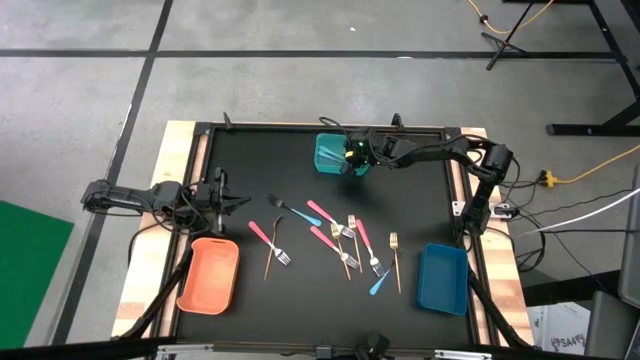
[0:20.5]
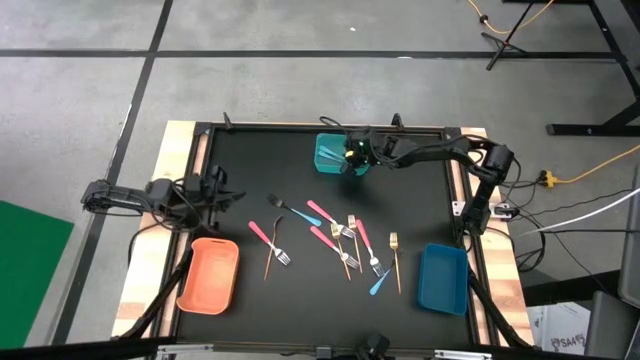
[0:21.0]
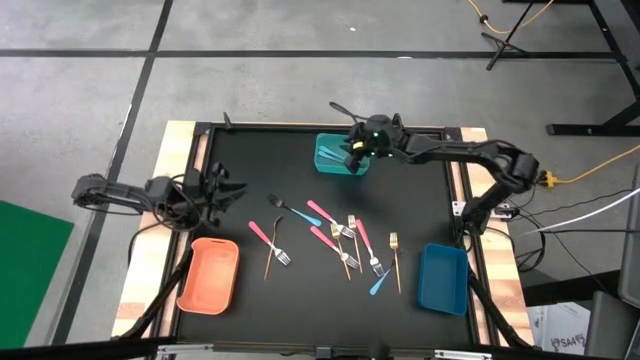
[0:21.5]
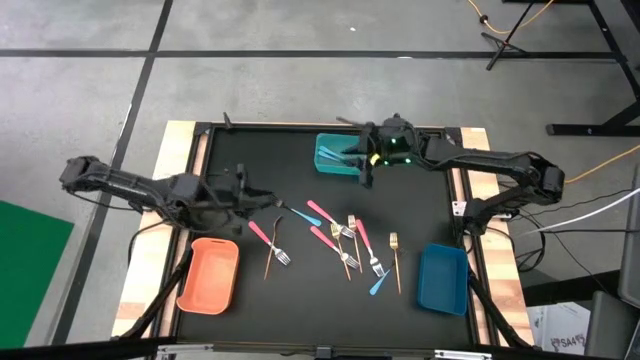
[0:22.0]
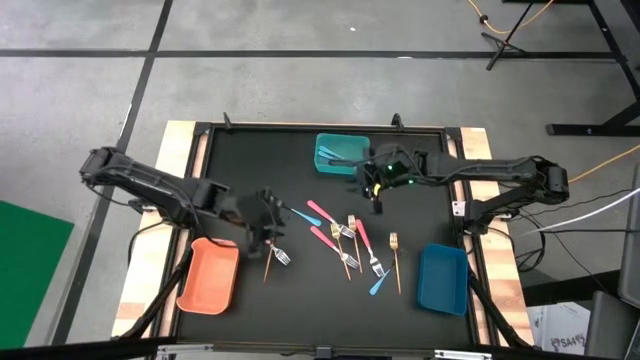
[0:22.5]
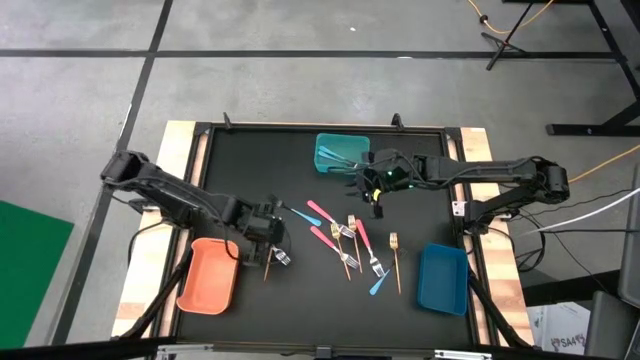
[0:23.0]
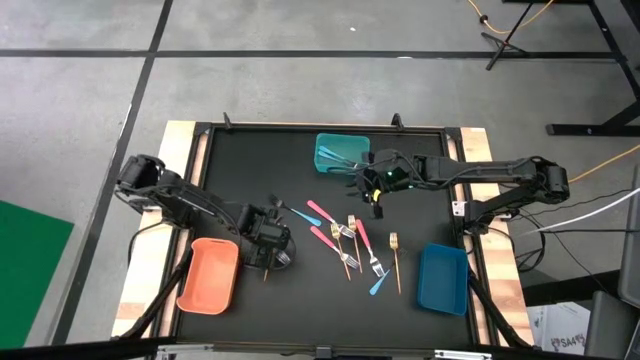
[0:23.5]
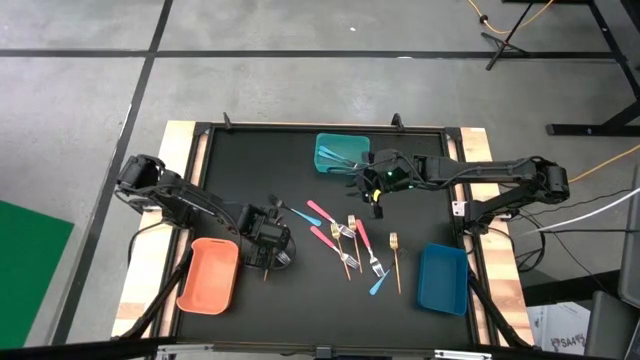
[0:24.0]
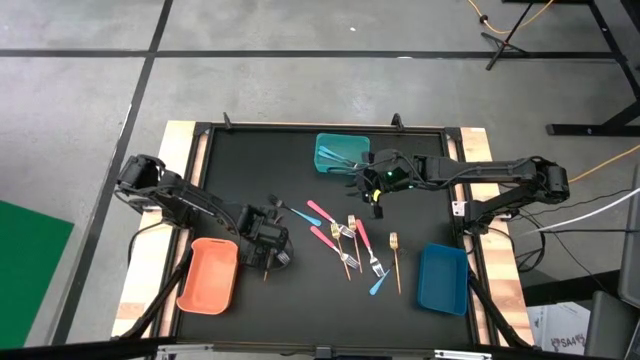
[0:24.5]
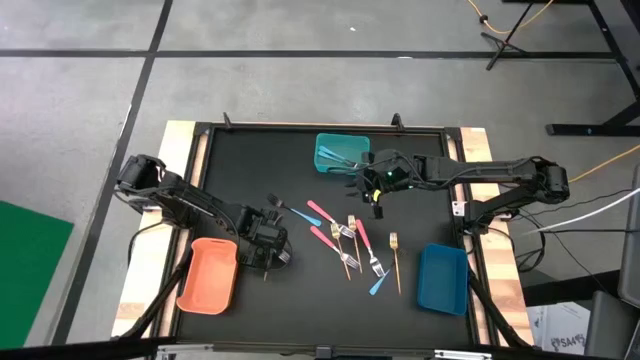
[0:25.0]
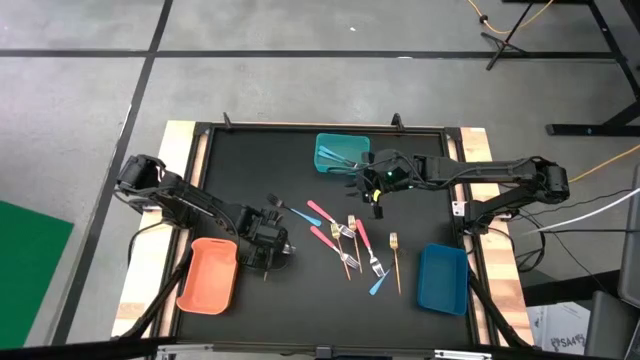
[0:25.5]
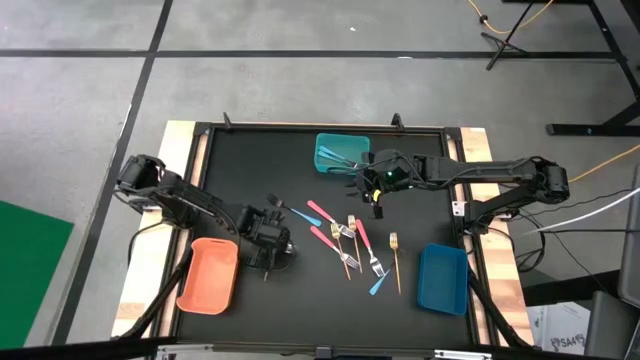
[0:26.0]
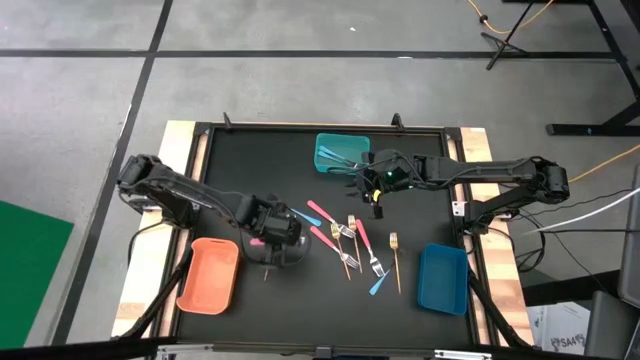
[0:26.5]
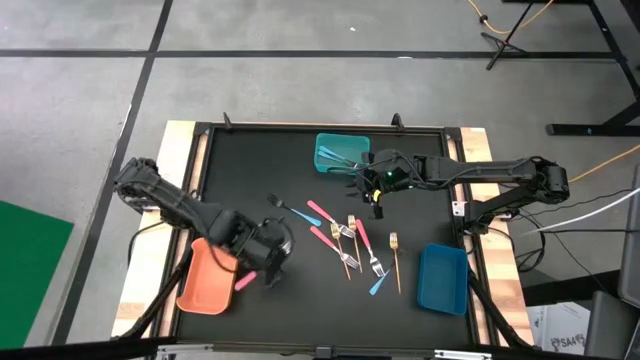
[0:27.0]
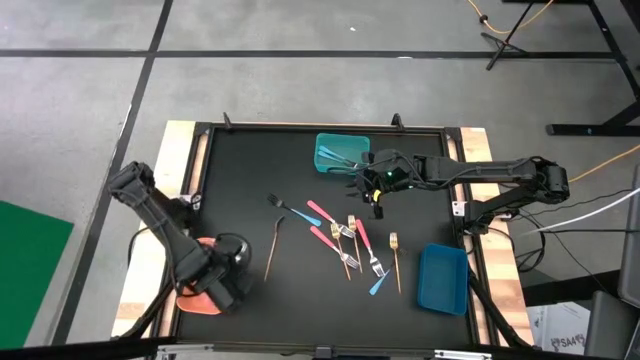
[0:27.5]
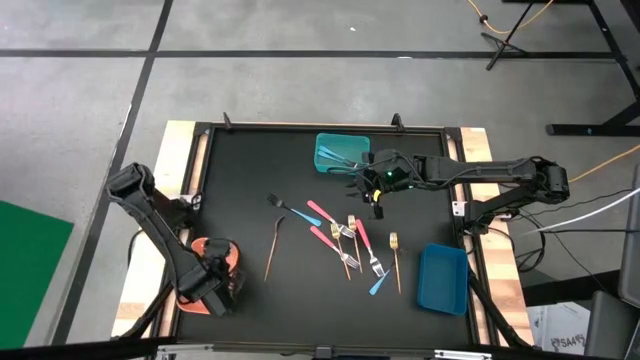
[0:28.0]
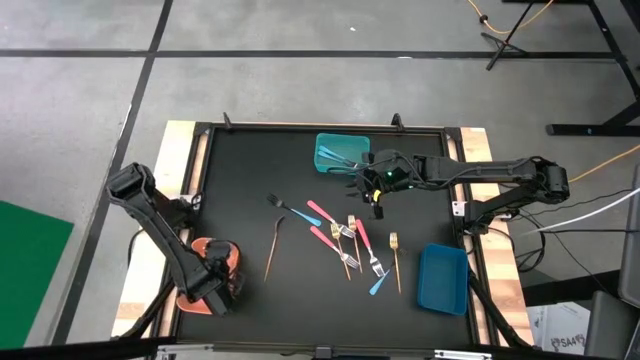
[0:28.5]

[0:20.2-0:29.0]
Task: Sort silverware by color (type)
Put the pink fork into the orange bin

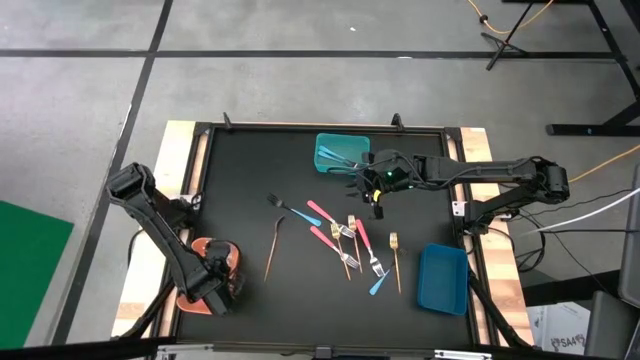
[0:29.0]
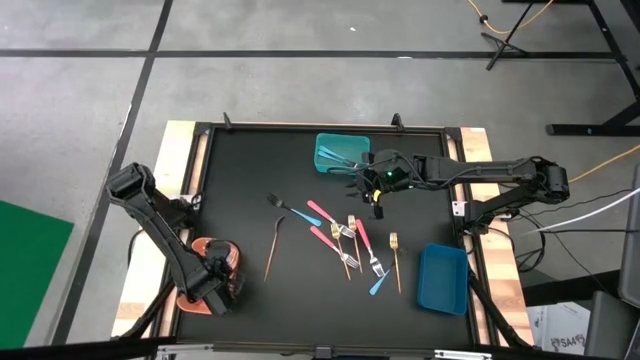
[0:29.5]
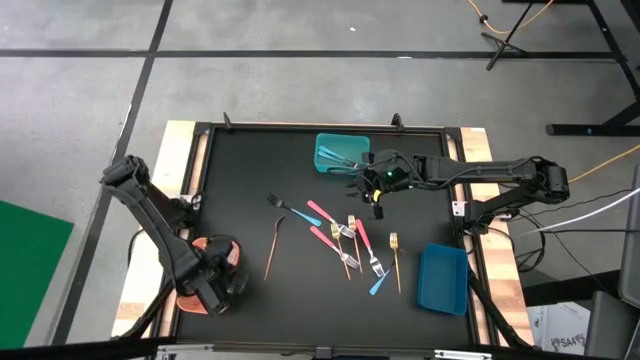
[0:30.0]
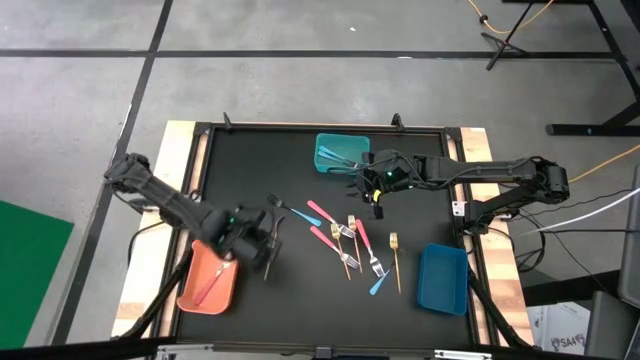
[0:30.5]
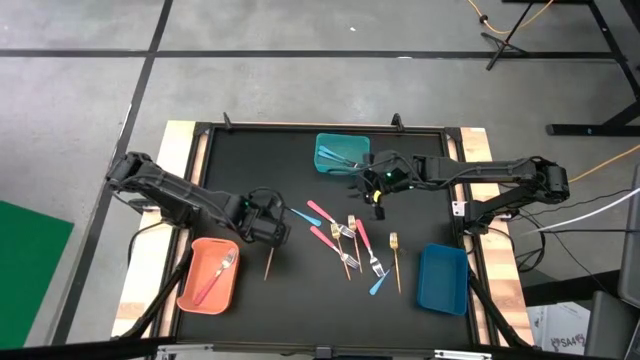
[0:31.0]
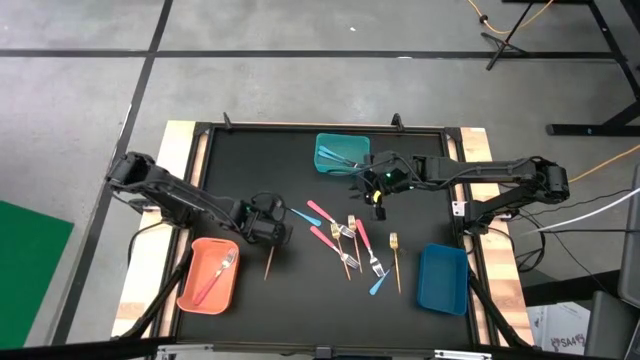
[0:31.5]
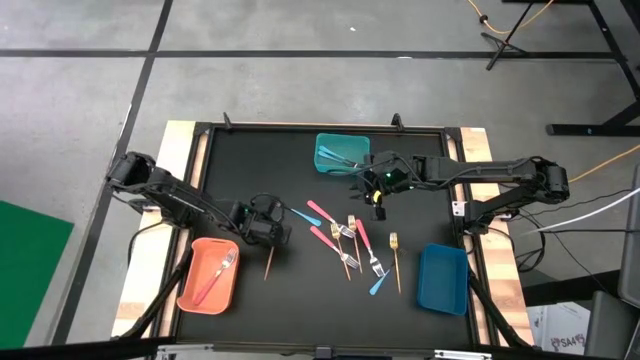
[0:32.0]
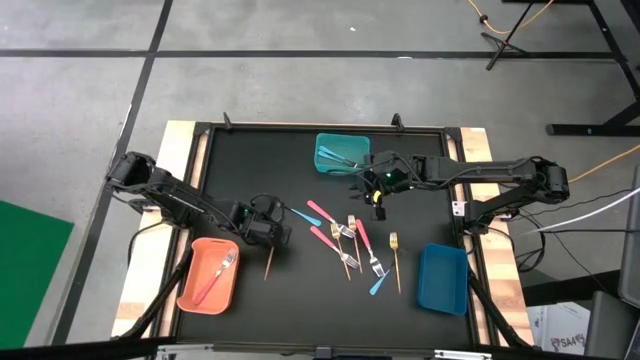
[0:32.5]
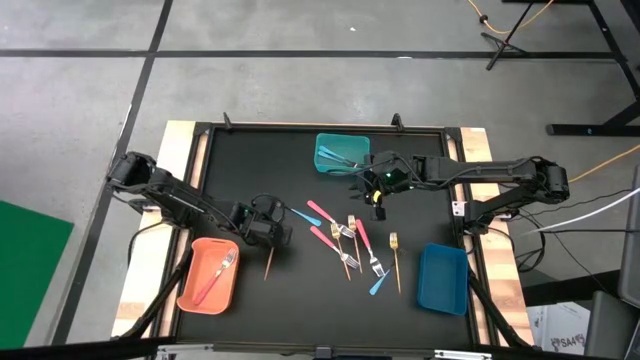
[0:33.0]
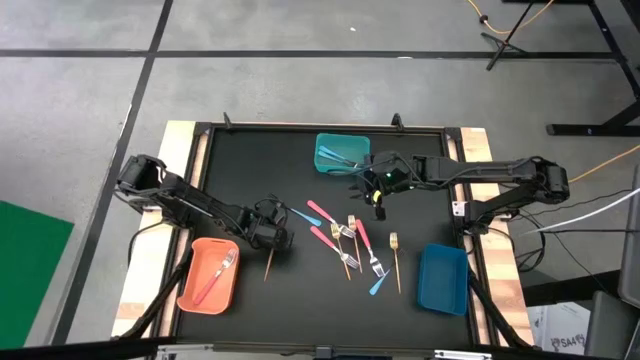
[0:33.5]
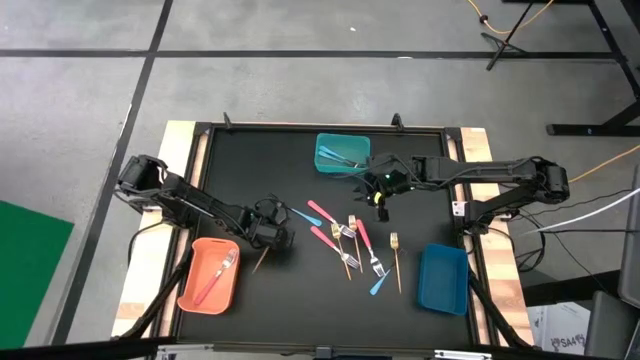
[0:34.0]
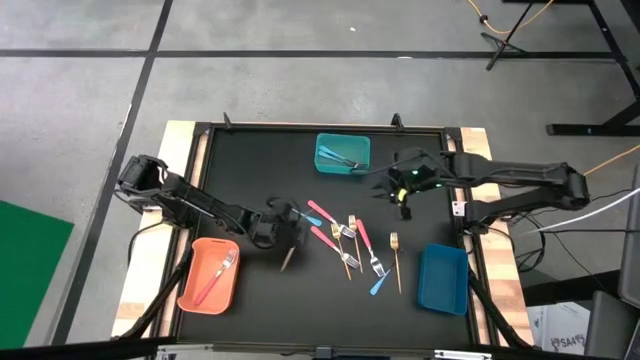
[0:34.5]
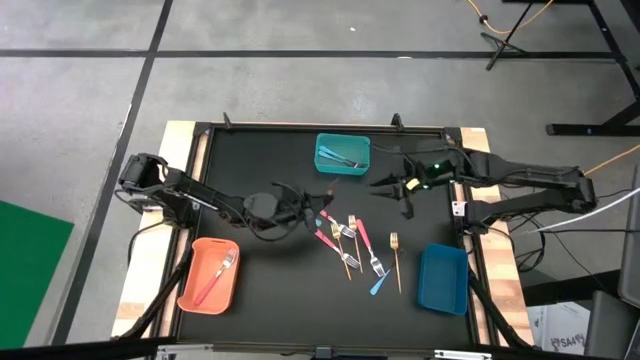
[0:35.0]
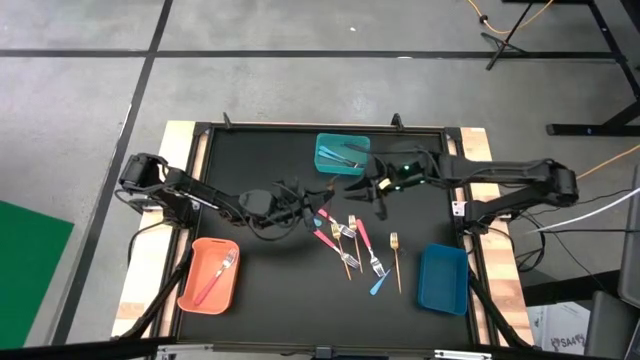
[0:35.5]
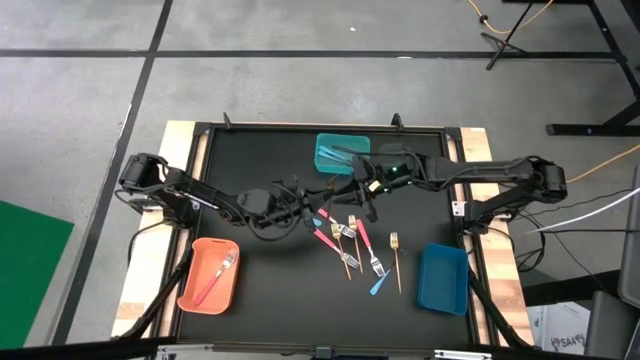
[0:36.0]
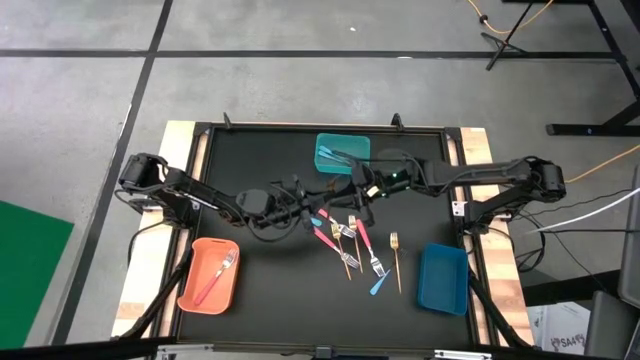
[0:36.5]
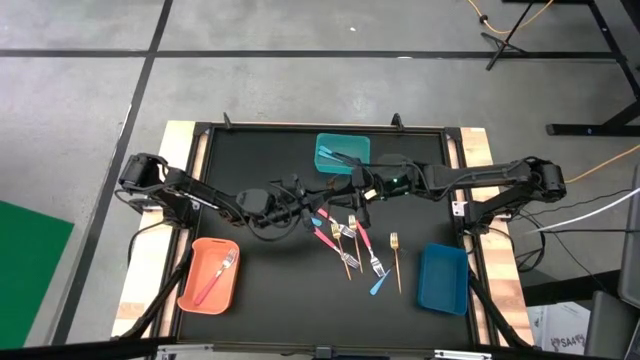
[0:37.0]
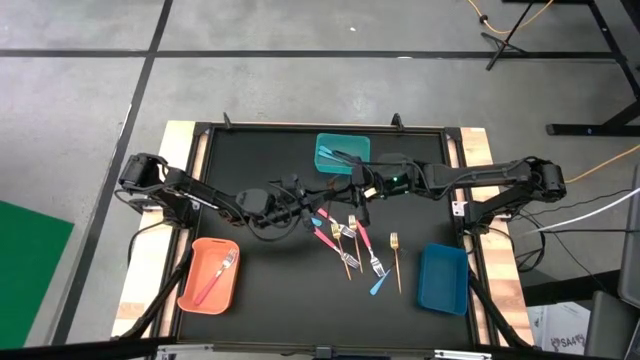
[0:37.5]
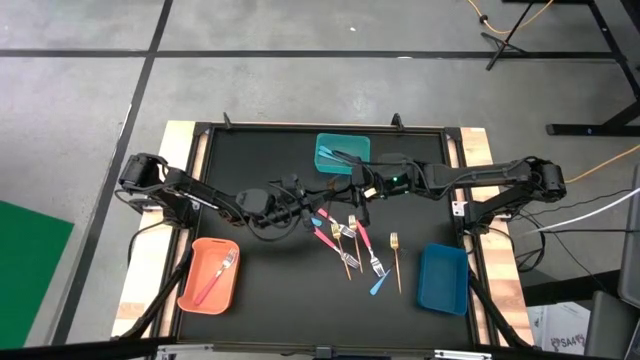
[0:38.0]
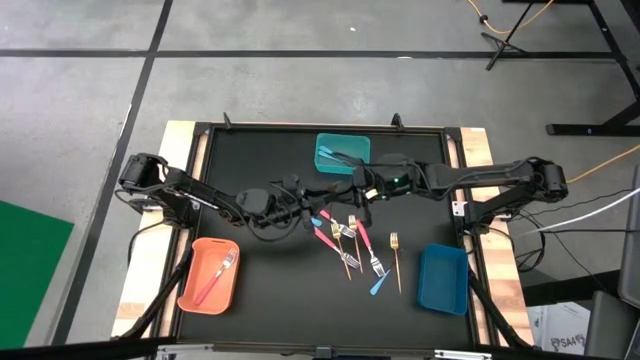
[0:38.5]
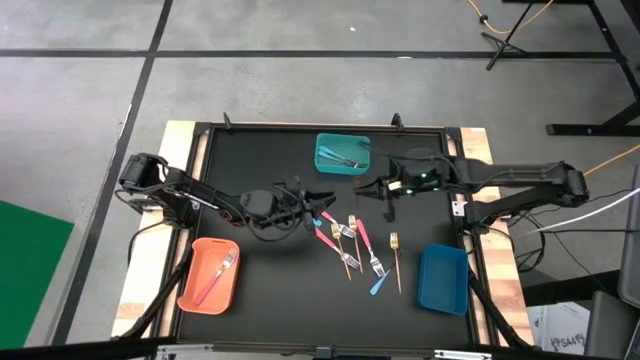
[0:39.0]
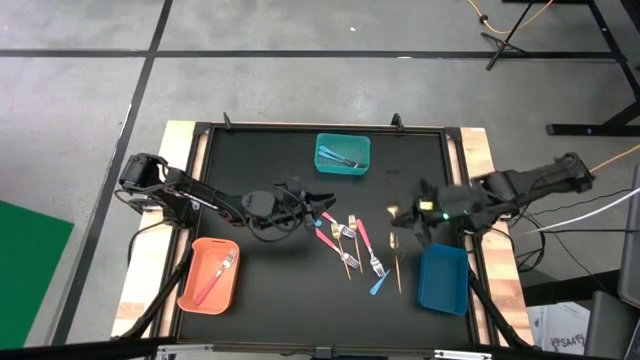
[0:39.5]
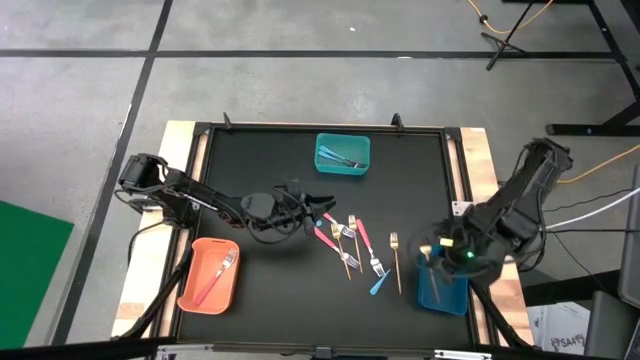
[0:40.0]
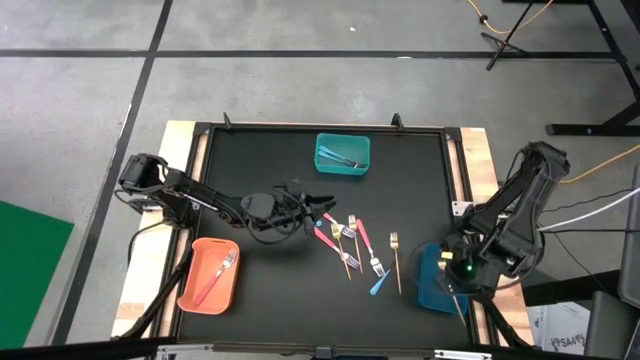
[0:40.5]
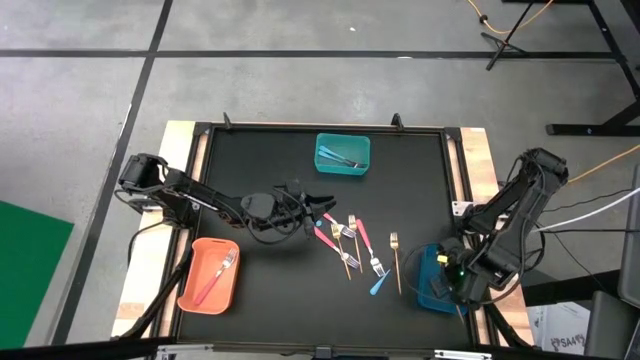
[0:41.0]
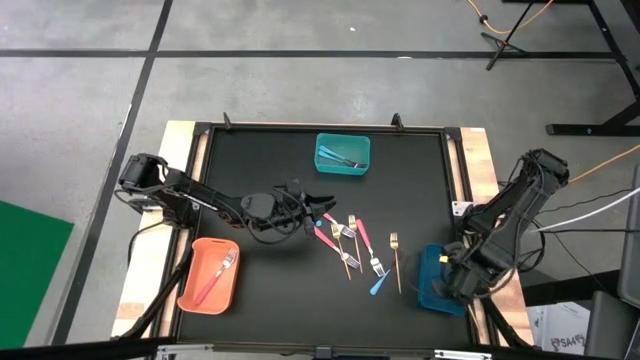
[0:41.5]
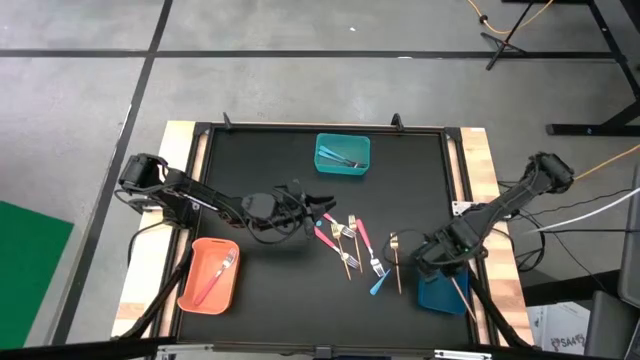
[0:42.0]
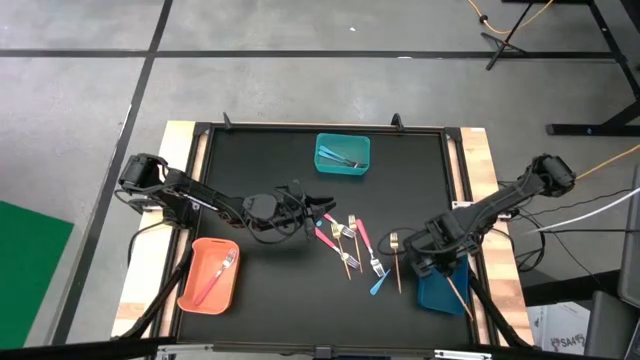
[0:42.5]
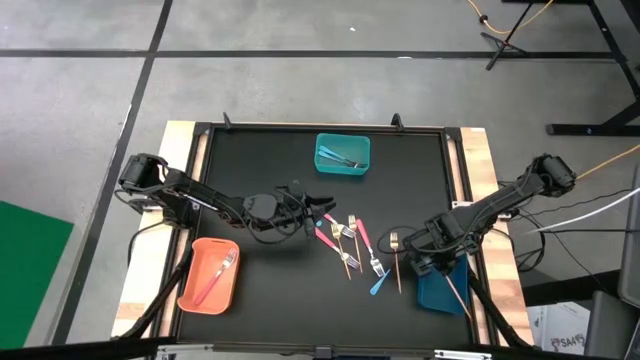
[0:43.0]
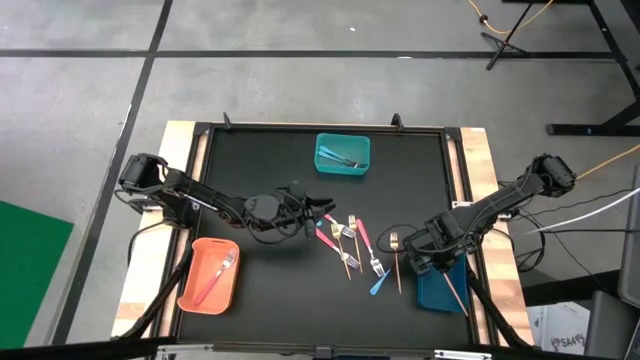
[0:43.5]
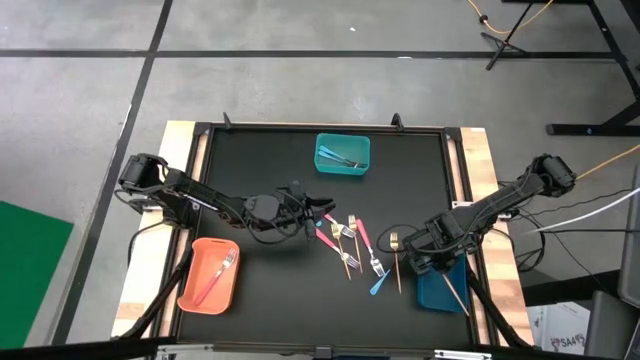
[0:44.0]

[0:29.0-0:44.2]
Put the gold fork into the blue bin
